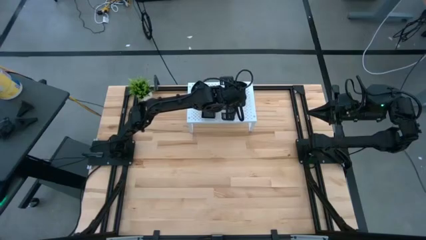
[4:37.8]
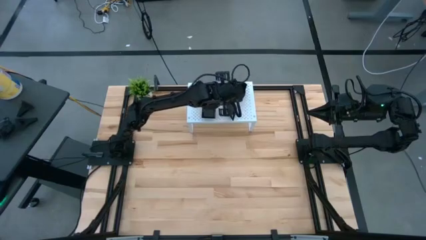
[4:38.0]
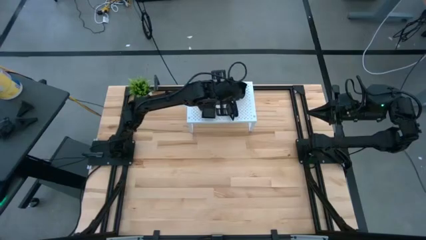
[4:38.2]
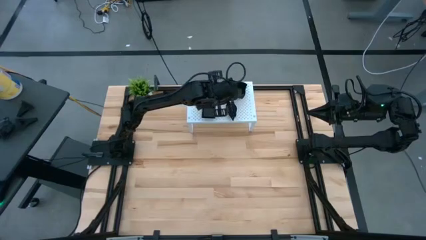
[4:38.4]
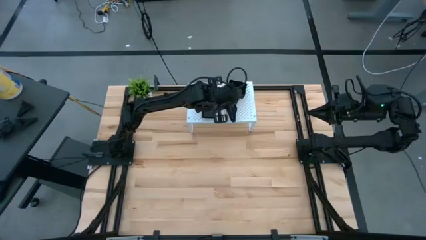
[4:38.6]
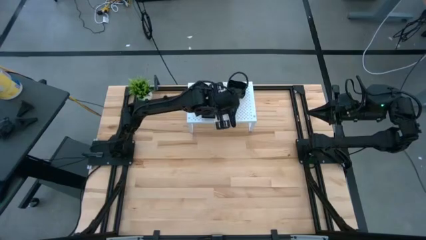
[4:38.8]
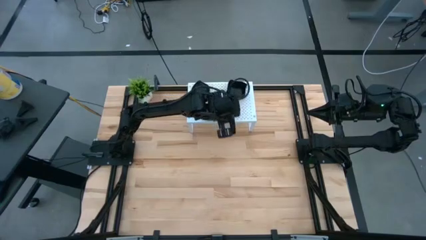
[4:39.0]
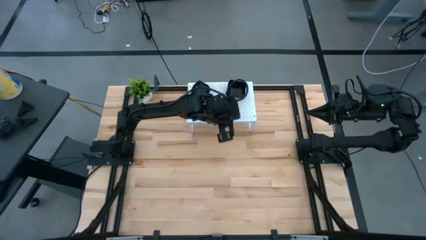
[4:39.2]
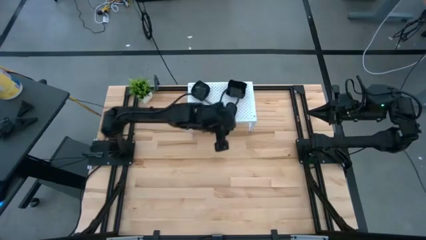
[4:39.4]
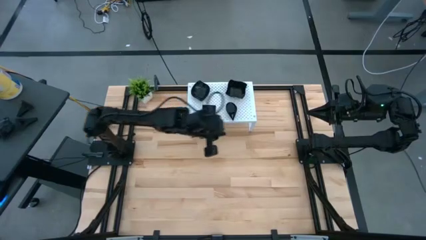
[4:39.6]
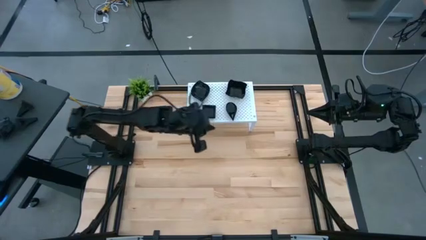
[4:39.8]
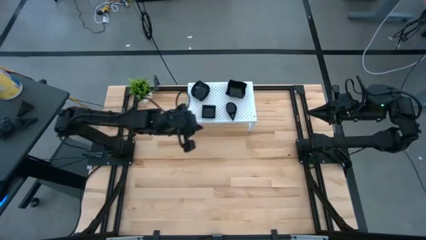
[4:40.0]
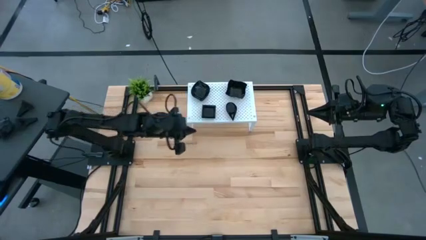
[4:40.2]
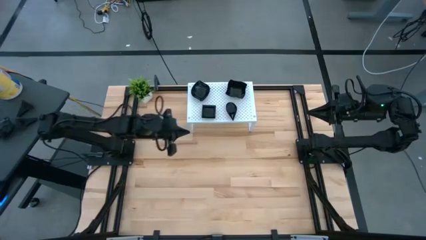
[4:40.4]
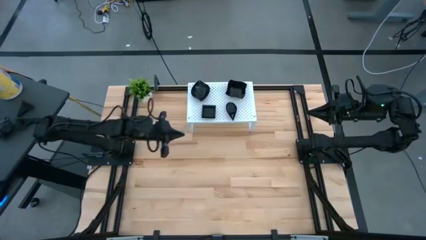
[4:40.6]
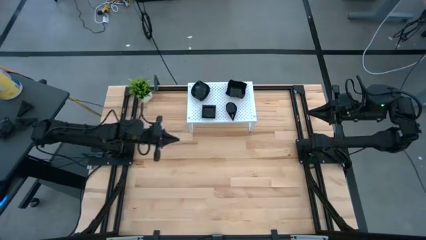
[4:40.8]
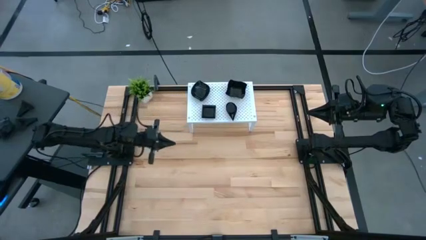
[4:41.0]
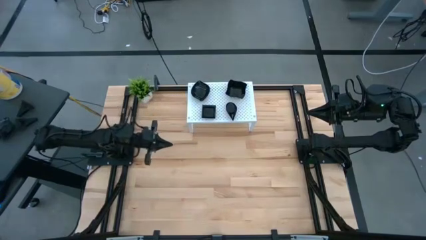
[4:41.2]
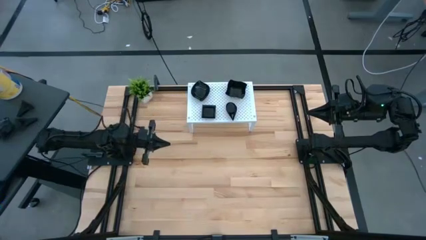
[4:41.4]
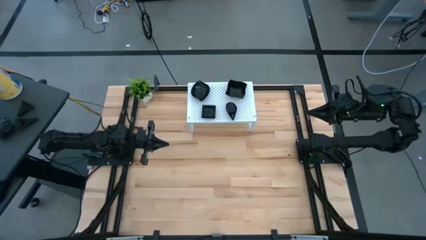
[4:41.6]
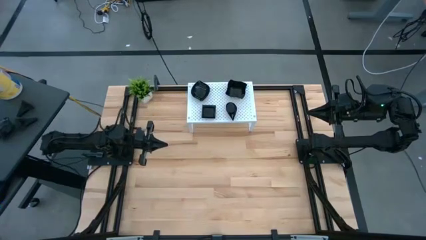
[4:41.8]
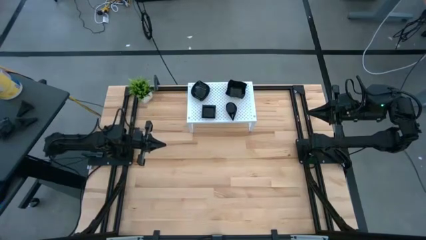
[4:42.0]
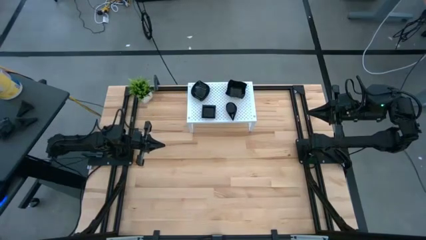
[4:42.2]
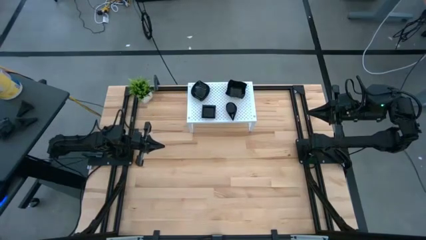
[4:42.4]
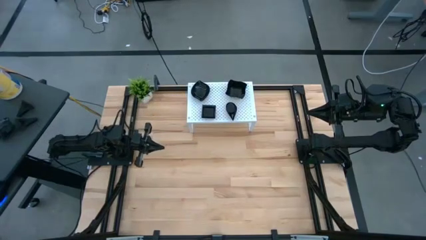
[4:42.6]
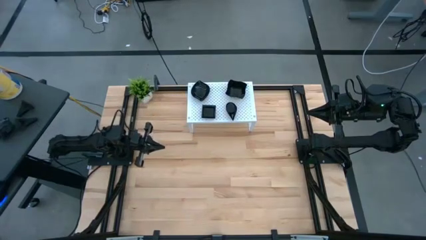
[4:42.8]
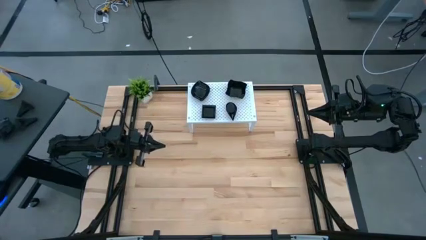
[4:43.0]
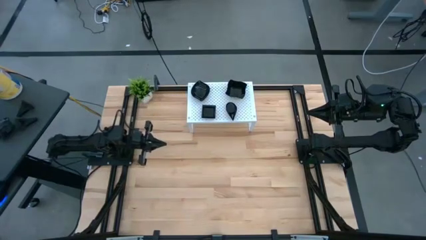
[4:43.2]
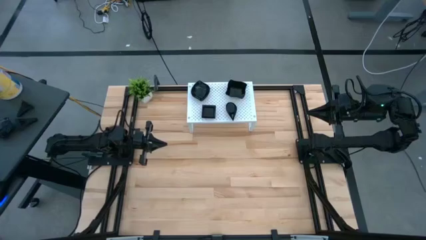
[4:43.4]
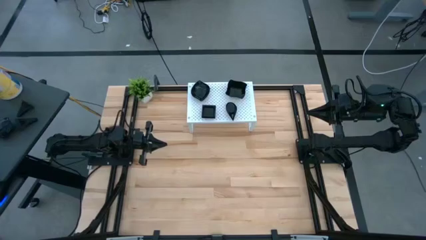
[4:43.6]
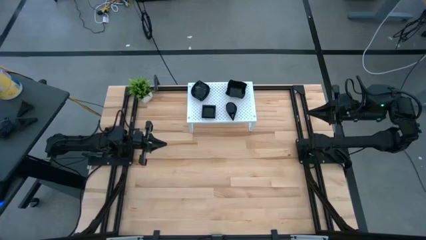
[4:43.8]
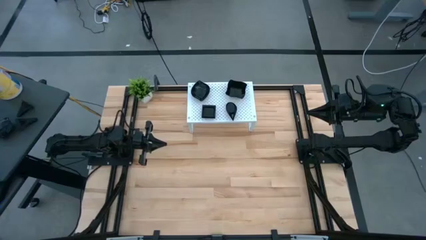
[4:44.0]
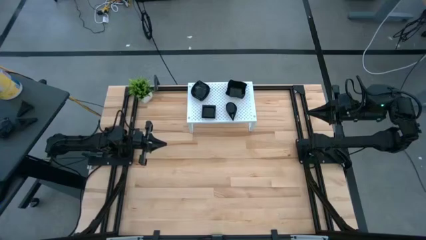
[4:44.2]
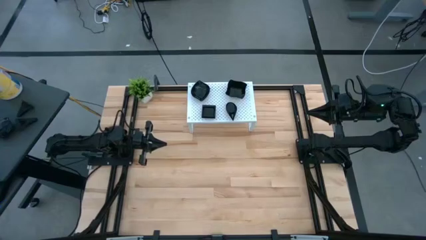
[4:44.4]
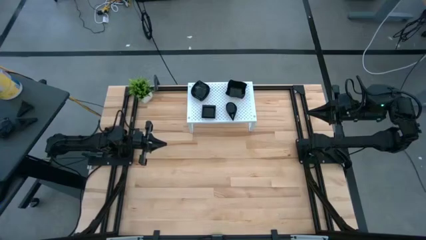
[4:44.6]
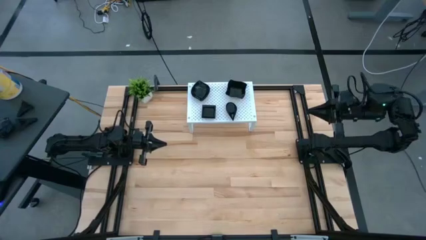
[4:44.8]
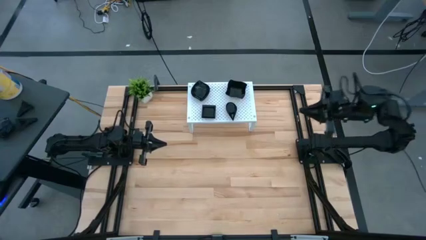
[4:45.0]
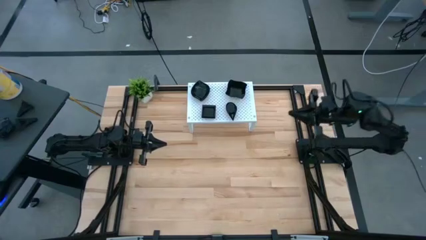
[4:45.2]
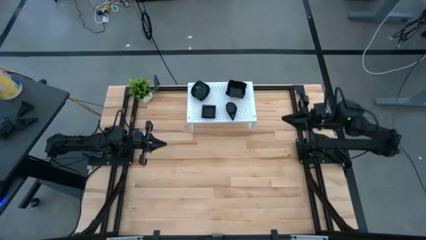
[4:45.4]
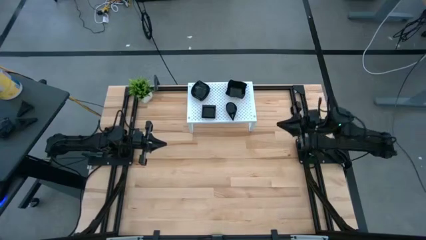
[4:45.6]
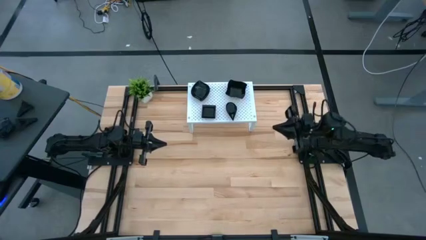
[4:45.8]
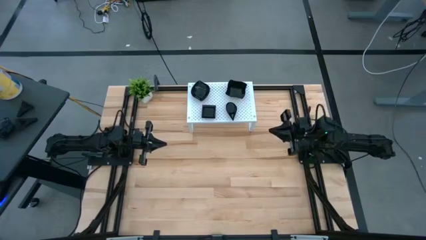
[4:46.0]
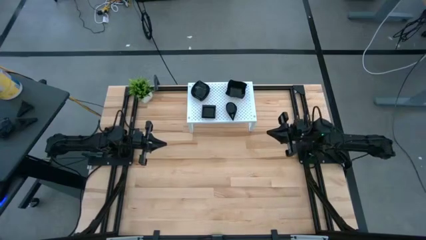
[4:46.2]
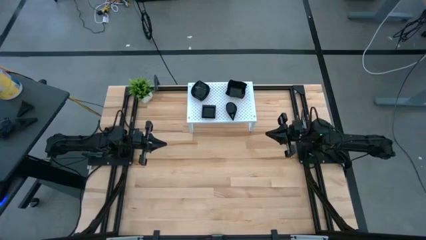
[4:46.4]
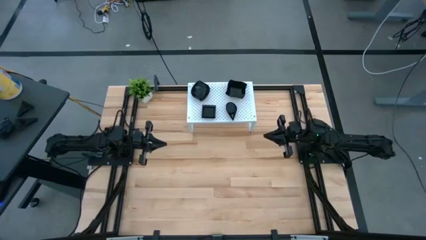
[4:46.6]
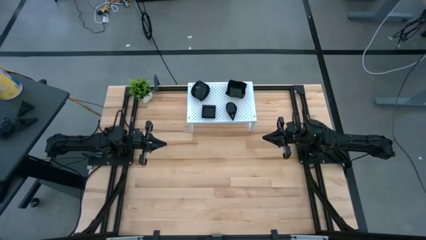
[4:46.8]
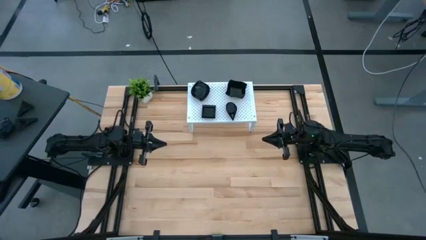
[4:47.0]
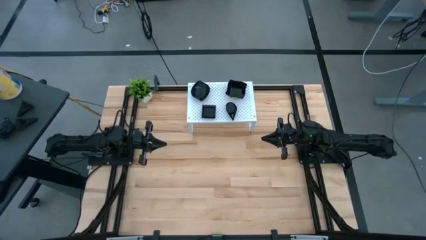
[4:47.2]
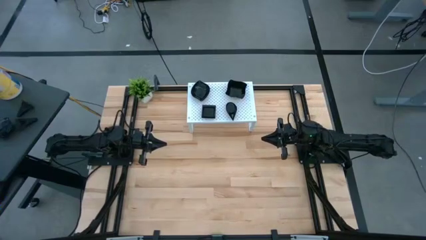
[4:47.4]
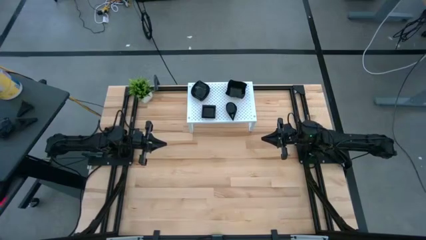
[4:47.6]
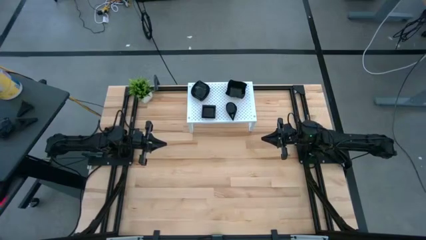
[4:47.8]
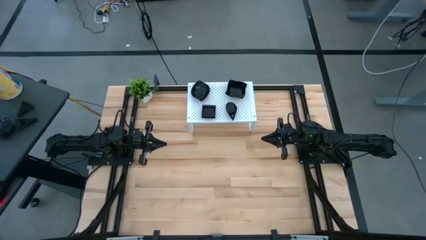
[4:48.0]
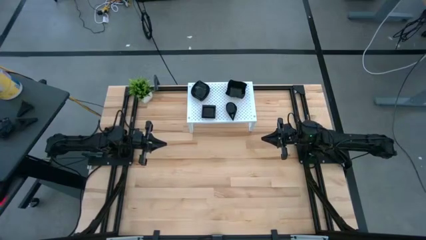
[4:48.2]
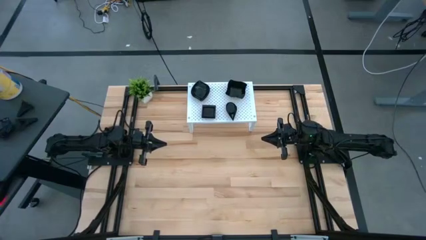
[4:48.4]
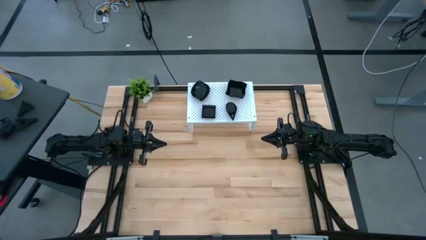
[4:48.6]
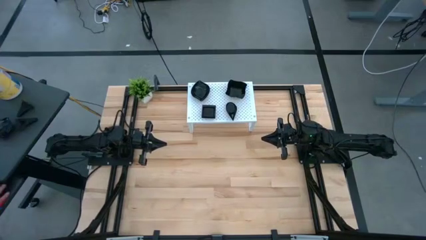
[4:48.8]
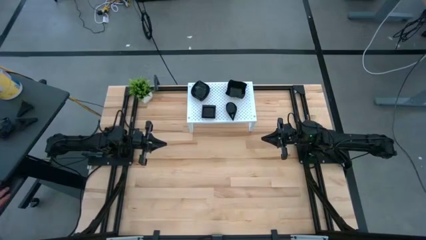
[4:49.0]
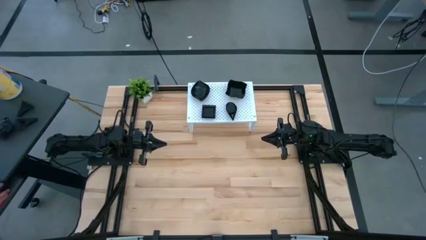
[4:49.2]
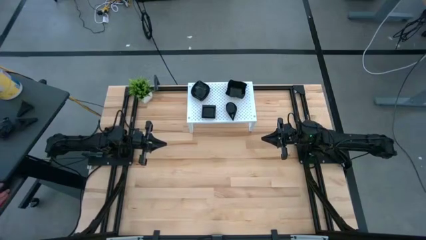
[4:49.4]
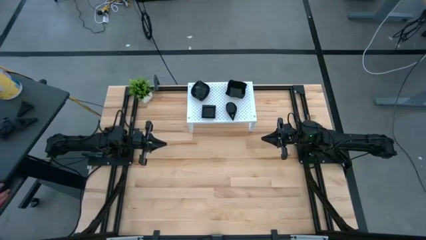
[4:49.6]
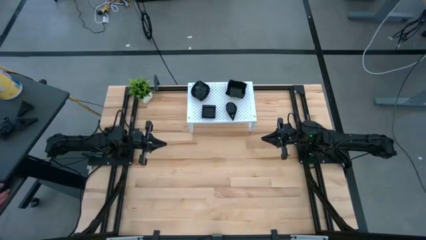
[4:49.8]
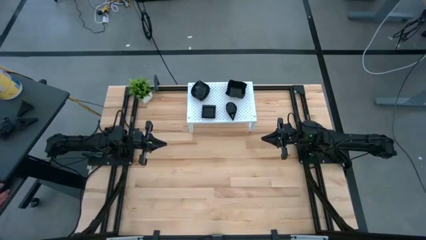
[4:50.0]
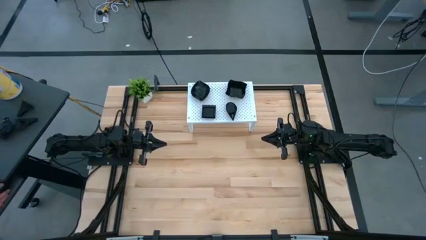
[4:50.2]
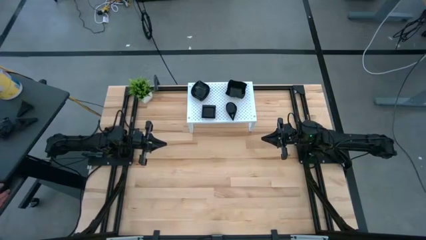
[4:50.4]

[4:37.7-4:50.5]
Task: Pick & Place Mini shaped plates
Return to Home Position
